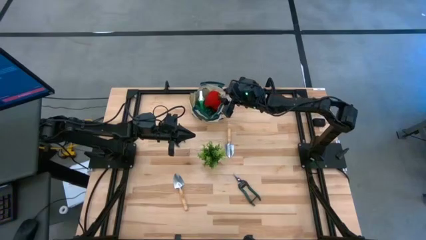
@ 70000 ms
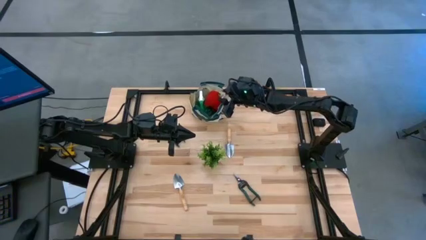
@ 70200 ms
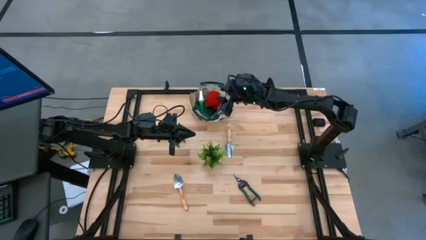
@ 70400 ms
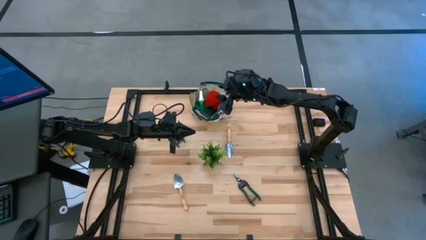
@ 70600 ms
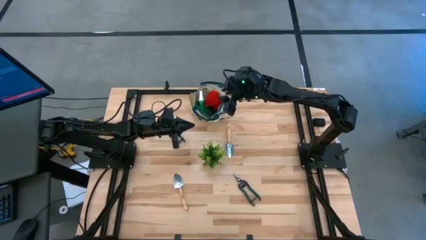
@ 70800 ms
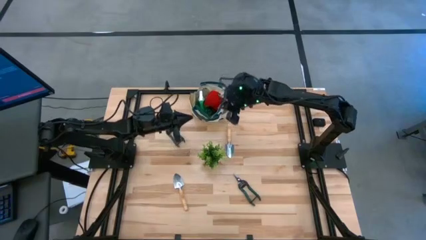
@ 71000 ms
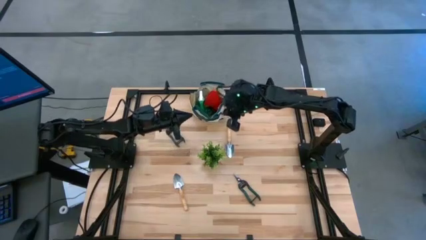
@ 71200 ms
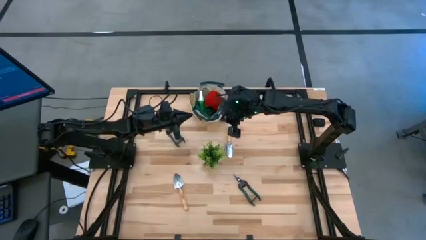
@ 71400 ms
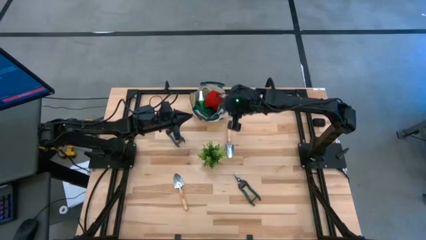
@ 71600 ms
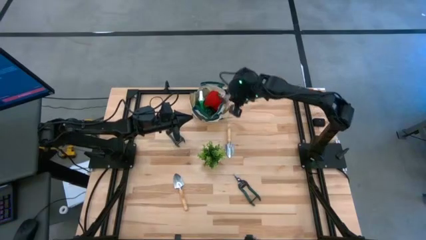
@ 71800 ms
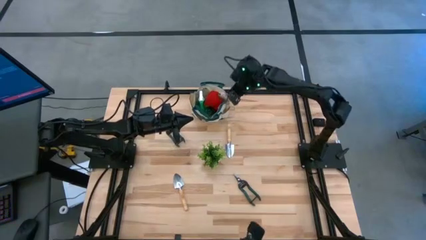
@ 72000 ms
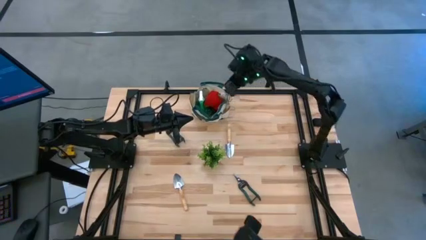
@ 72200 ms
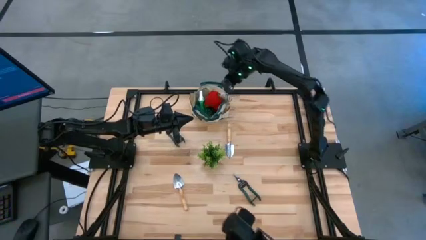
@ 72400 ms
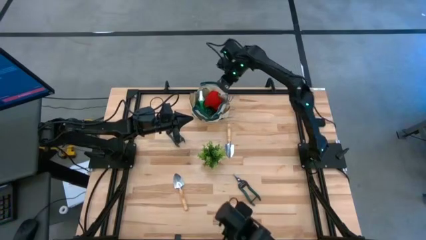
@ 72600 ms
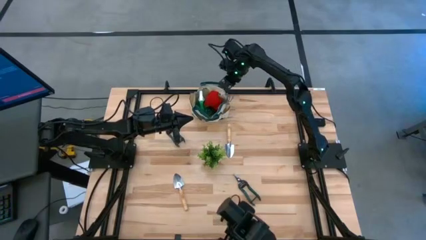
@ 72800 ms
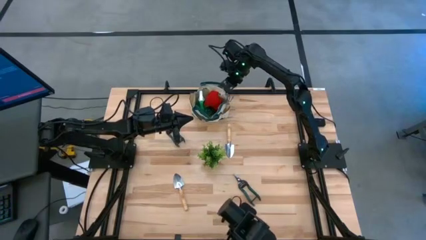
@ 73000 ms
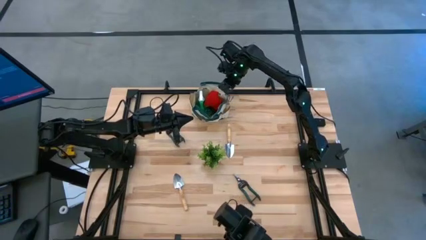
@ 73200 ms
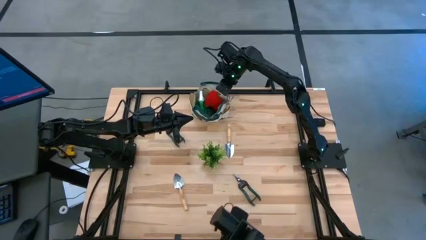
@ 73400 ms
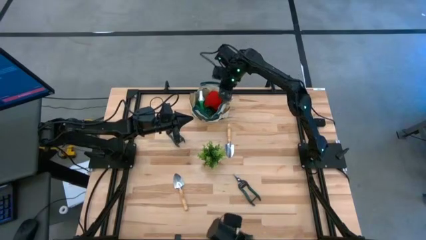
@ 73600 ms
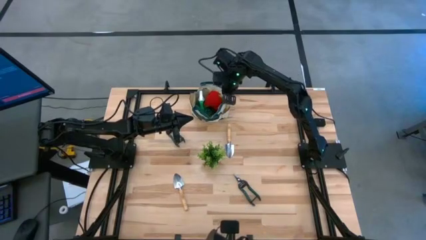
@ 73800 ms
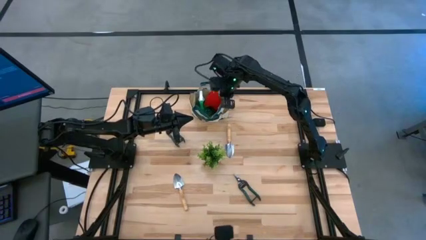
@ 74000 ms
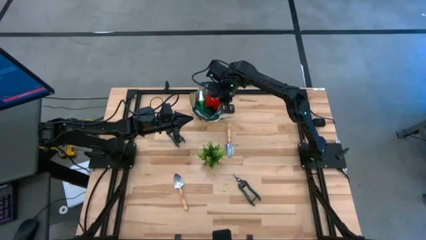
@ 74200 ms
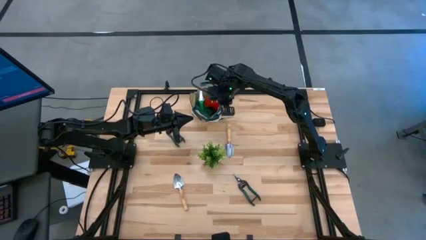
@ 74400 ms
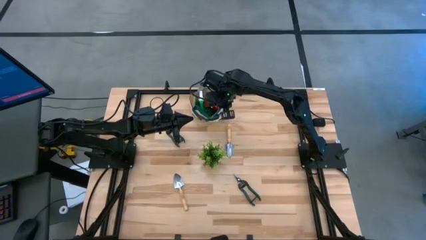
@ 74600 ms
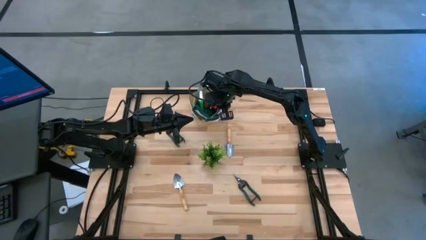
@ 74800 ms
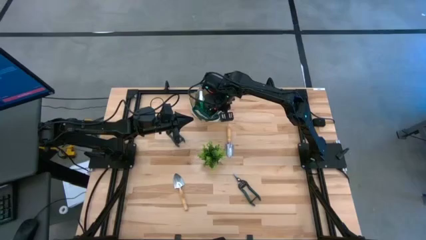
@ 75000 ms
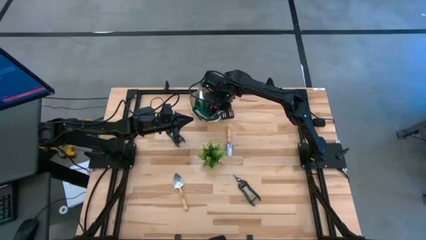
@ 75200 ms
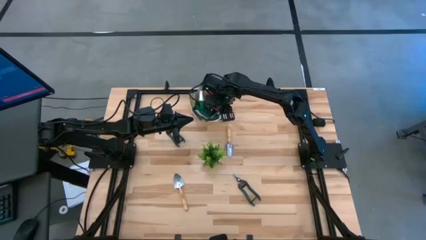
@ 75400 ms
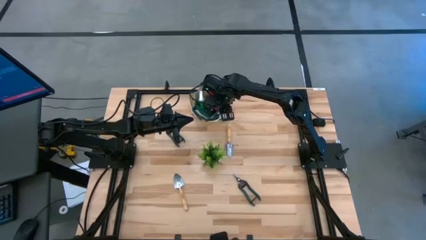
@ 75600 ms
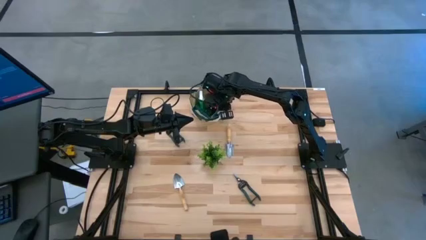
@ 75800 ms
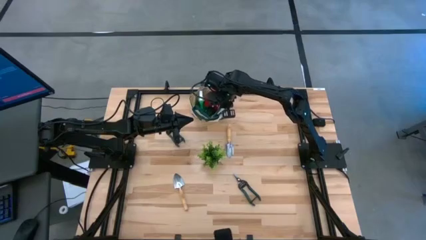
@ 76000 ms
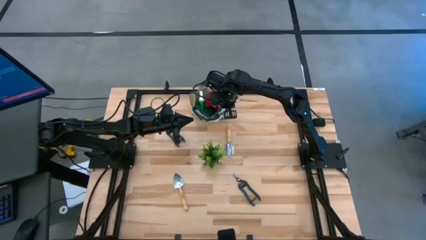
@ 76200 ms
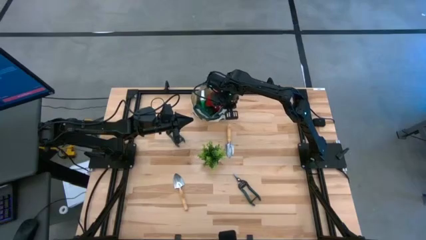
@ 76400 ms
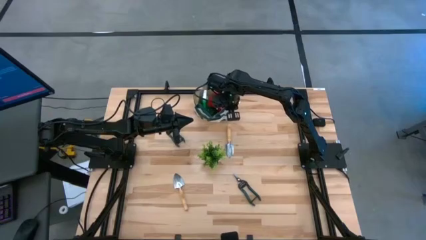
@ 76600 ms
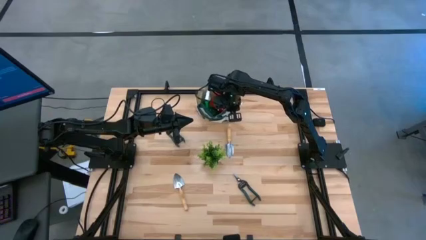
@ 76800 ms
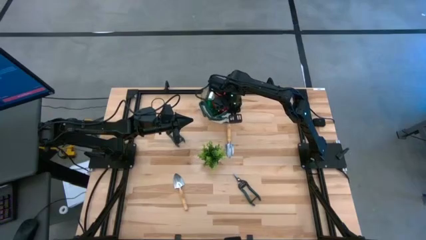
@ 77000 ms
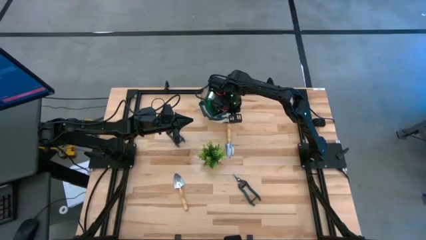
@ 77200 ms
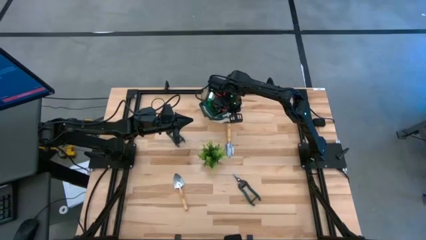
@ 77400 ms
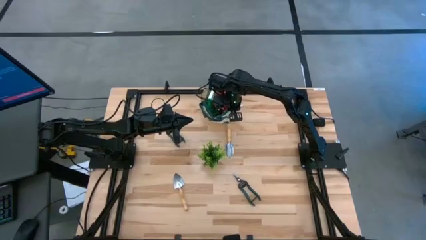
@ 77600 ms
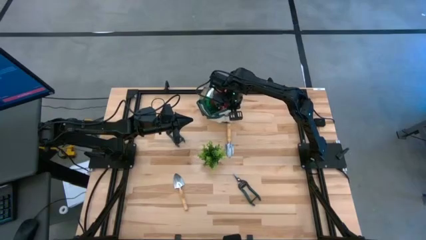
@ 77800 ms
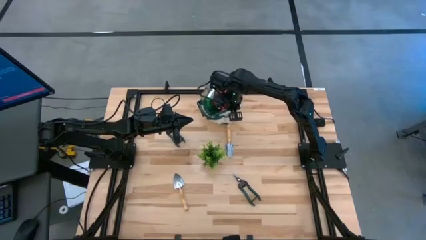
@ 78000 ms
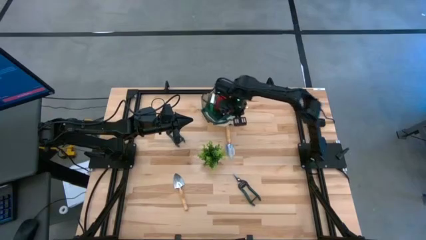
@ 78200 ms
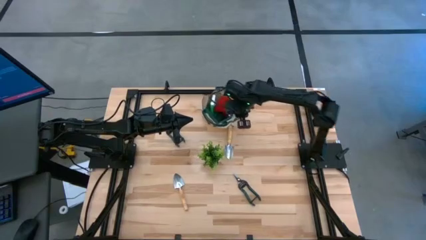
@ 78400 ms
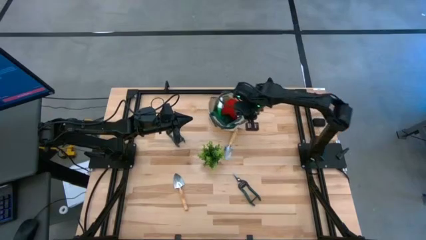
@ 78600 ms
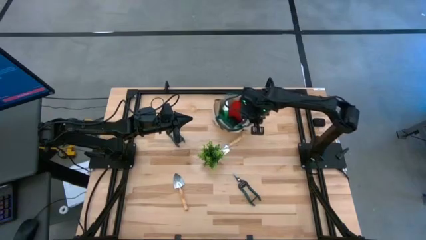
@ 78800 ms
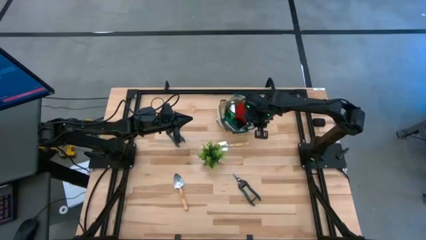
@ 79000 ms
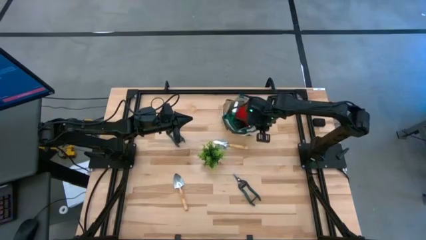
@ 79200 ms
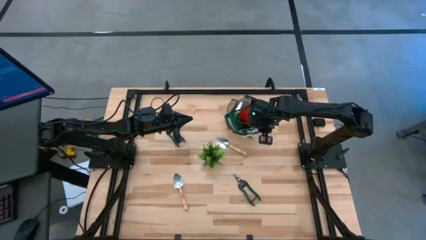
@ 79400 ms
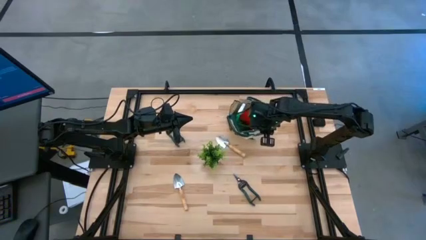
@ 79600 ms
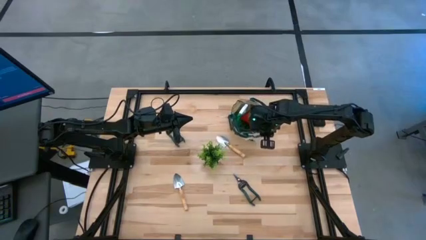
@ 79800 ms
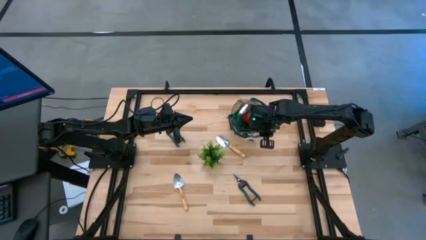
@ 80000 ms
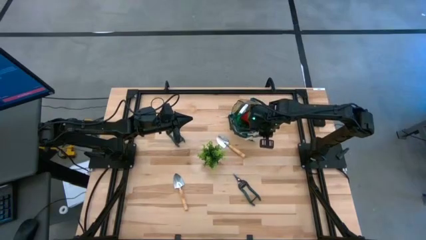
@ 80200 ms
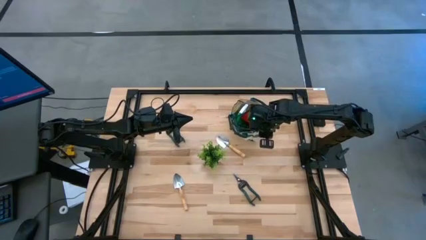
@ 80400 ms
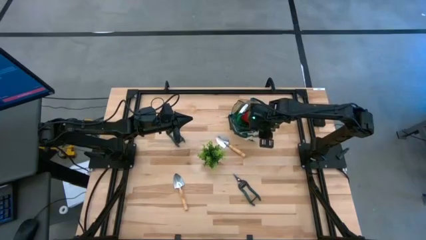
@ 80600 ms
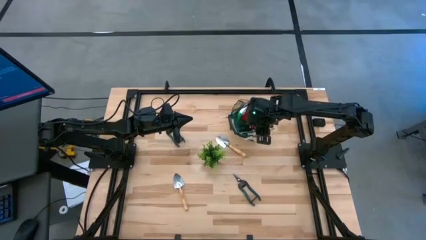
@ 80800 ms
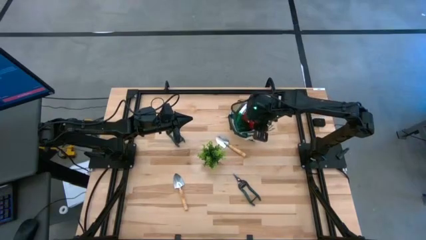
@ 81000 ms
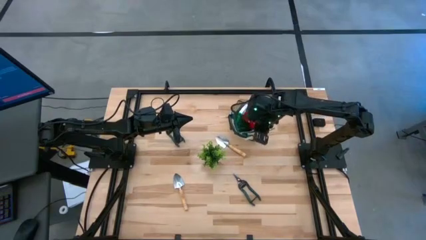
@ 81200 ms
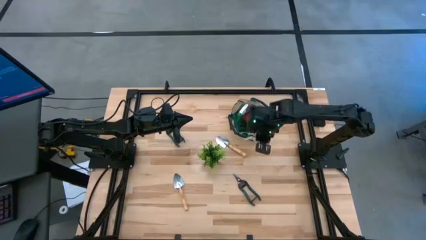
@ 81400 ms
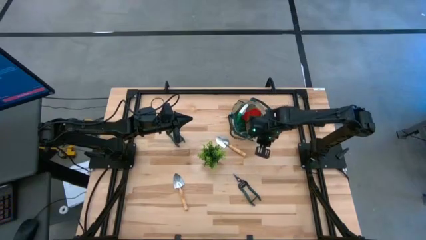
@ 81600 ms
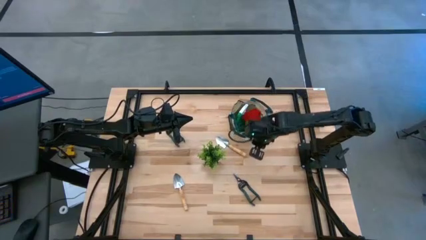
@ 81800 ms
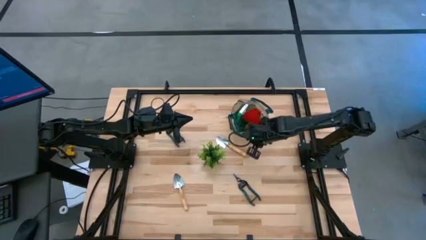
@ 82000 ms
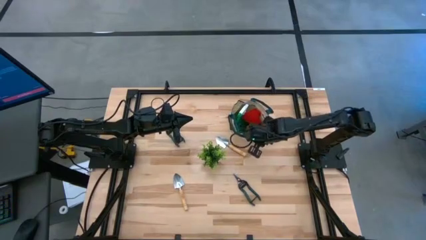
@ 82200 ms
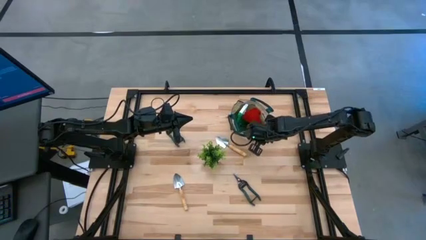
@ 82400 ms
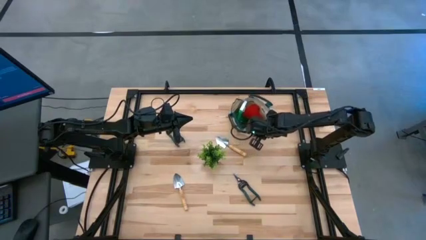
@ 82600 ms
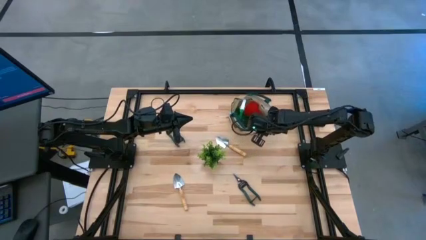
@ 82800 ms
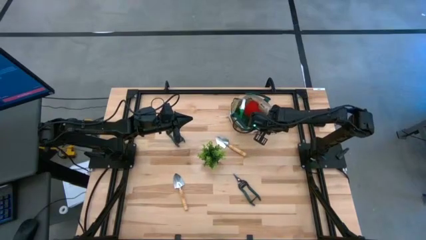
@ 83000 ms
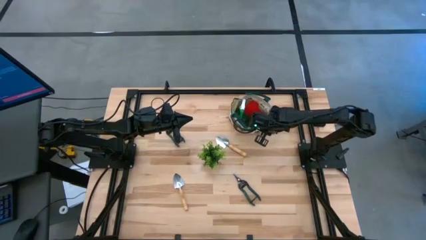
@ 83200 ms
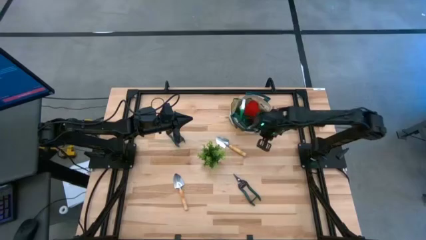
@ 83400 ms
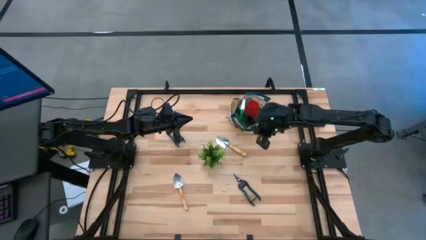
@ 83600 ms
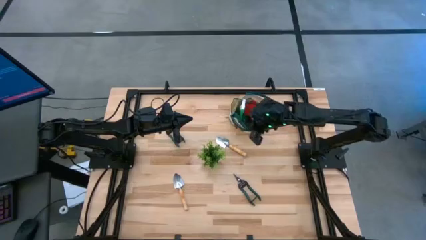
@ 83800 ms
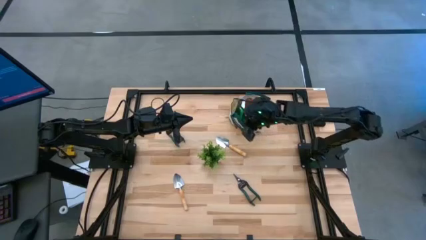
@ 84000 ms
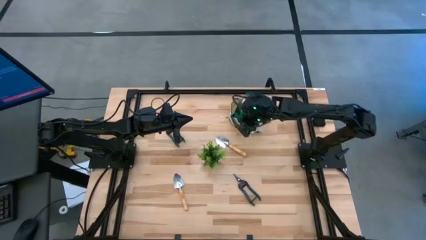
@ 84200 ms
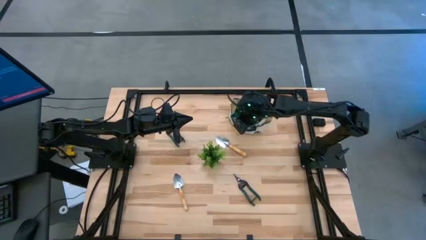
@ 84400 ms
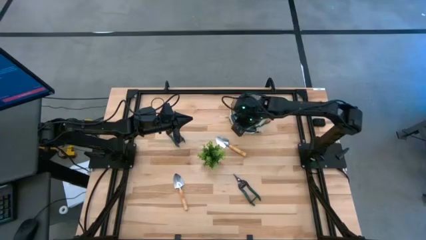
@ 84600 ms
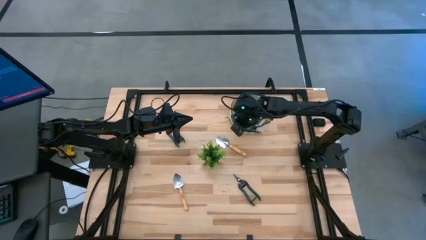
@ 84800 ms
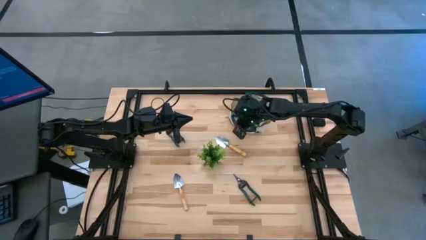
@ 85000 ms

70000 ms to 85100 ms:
Task: Pick & Place Garden tools in Gardening bag
Move the brown gardening bag to the top right of the table

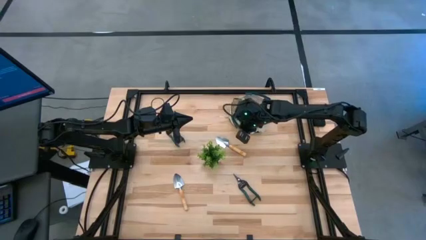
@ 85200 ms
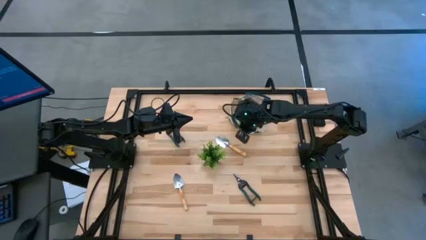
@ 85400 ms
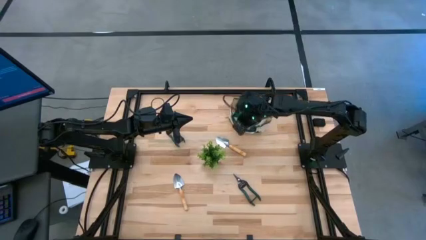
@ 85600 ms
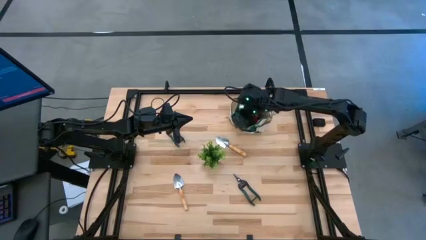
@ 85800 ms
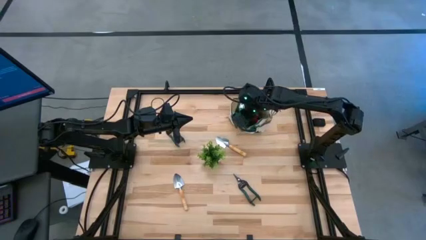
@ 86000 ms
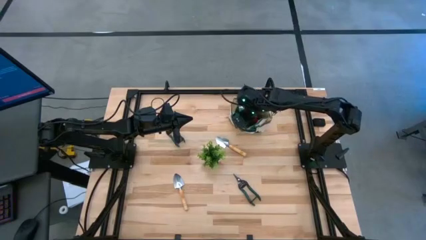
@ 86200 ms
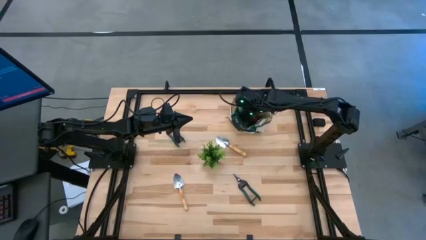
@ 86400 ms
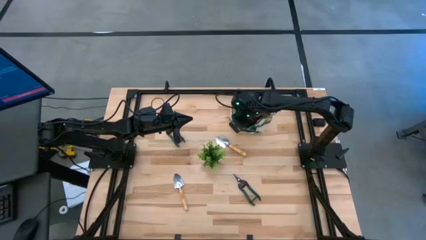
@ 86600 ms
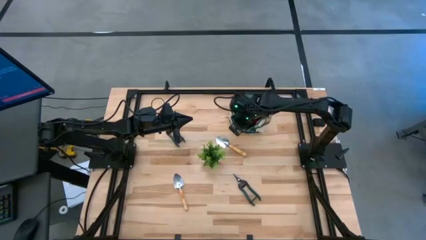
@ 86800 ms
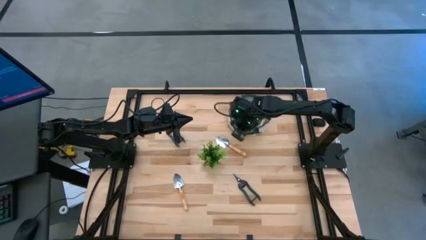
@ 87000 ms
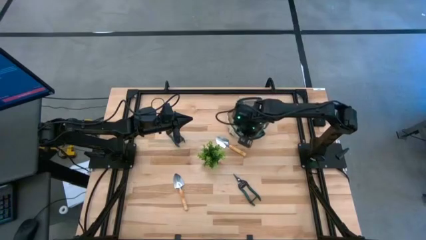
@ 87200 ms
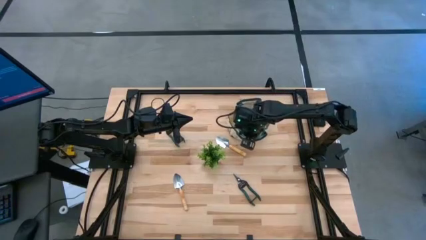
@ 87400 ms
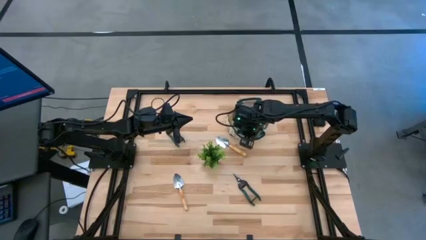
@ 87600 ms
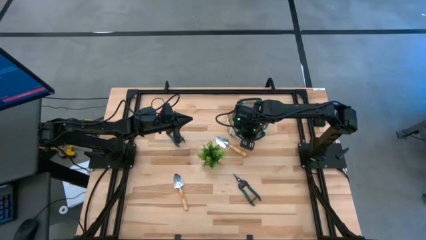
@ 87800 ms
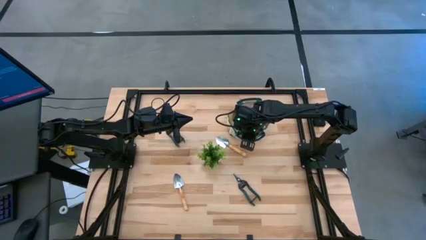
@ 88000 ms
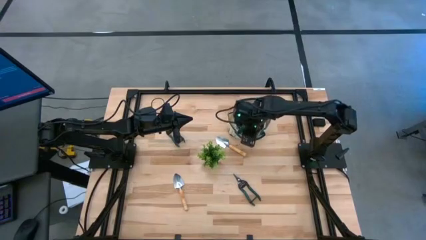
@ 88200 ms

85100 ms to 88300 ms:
Move the brown gardening bag to the top right of the table
